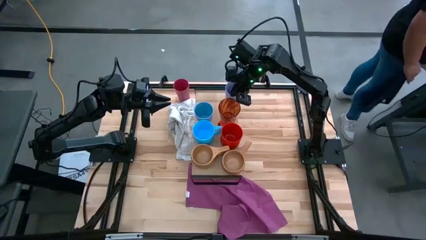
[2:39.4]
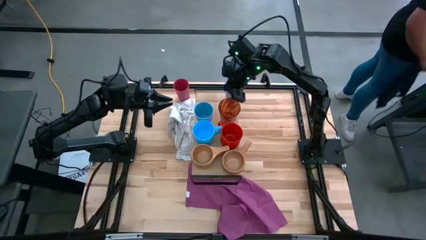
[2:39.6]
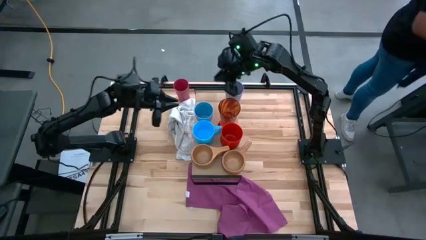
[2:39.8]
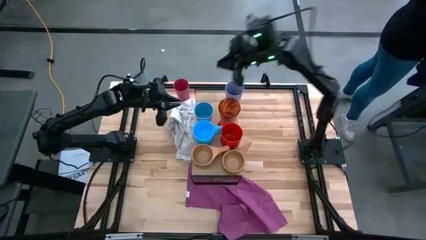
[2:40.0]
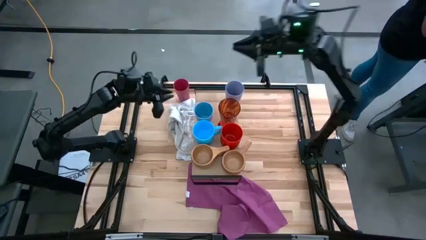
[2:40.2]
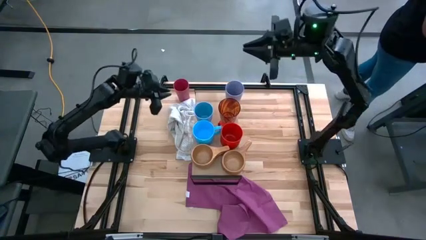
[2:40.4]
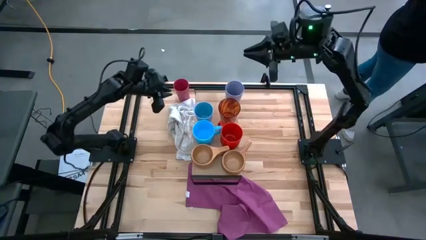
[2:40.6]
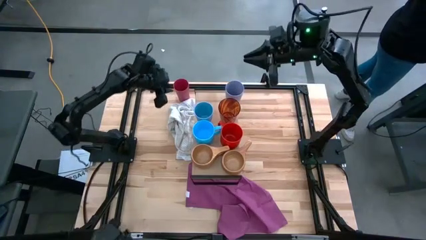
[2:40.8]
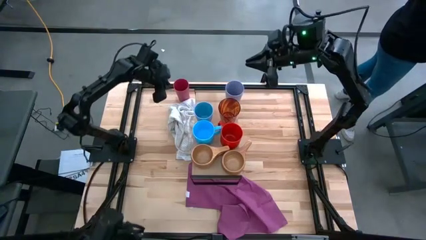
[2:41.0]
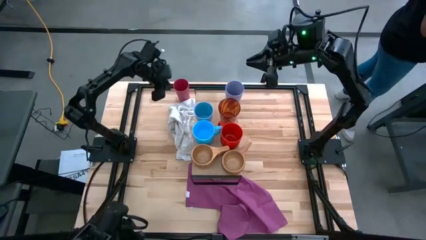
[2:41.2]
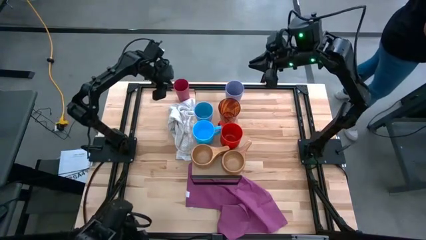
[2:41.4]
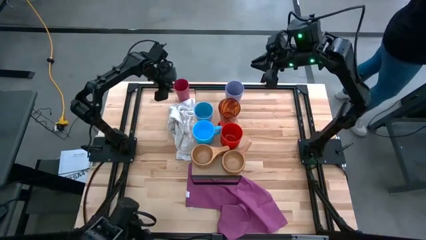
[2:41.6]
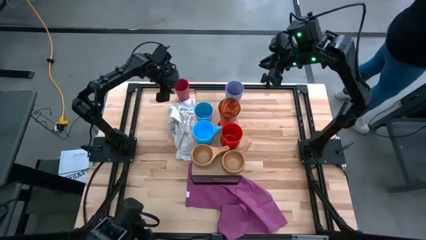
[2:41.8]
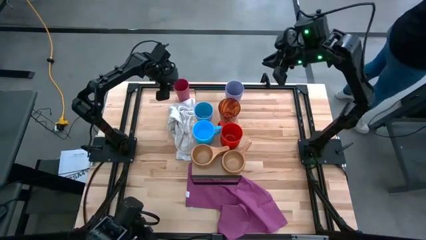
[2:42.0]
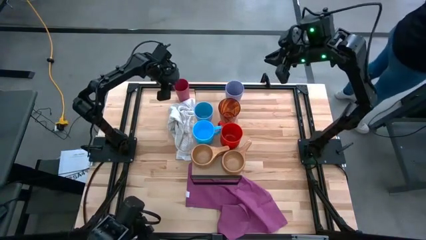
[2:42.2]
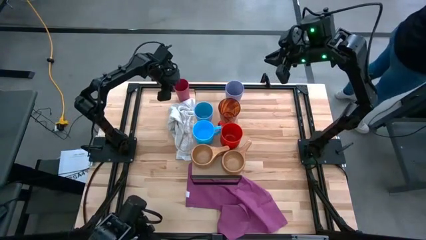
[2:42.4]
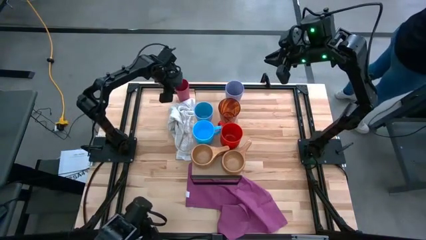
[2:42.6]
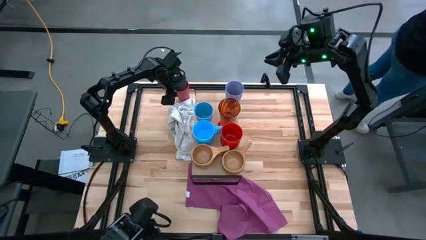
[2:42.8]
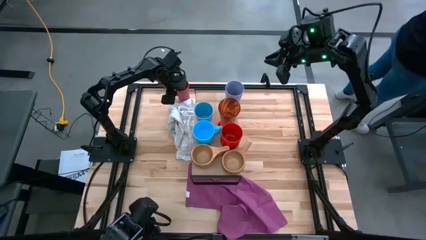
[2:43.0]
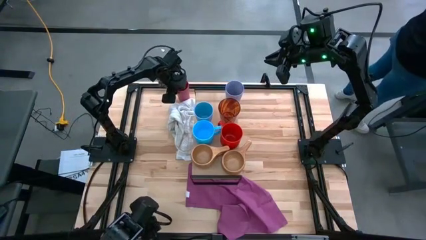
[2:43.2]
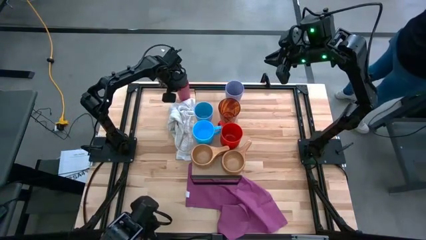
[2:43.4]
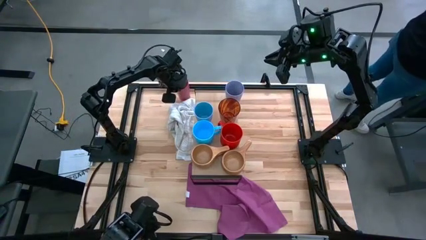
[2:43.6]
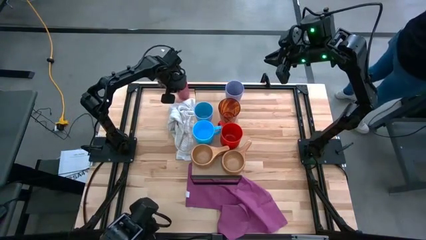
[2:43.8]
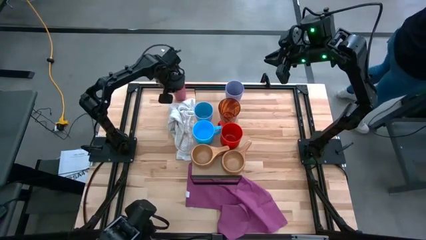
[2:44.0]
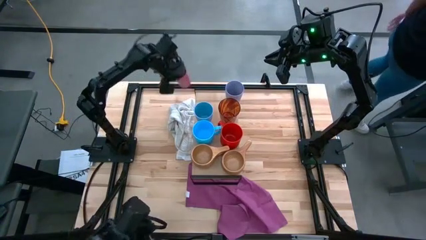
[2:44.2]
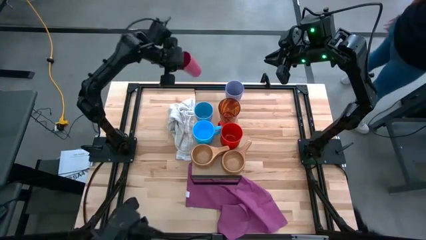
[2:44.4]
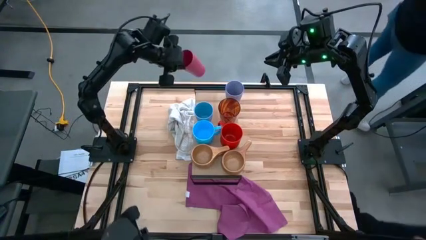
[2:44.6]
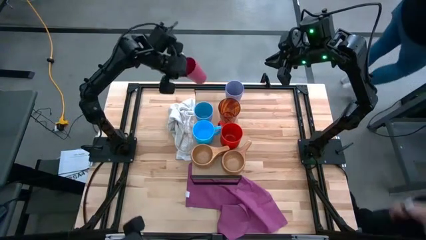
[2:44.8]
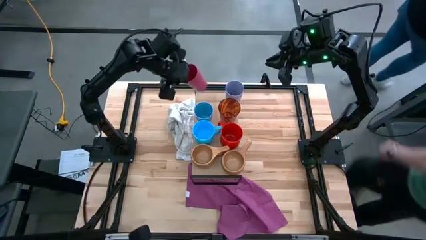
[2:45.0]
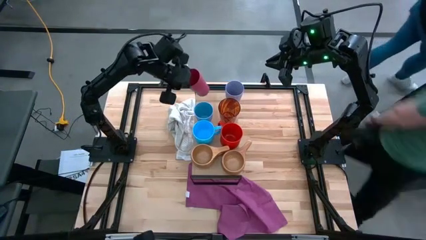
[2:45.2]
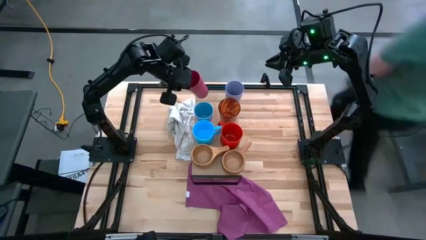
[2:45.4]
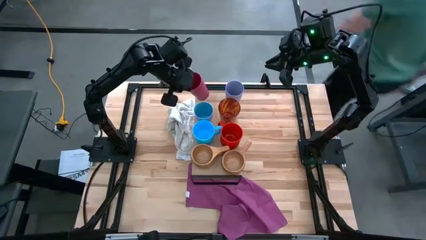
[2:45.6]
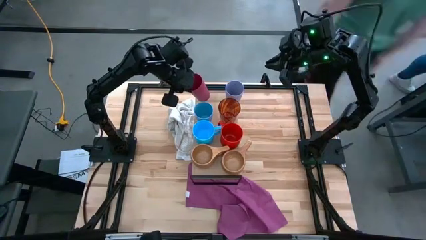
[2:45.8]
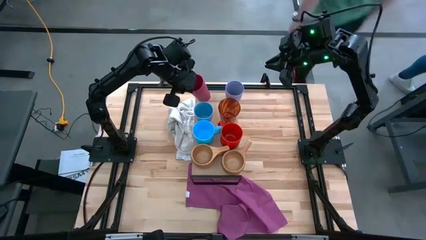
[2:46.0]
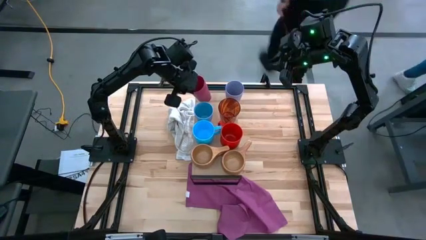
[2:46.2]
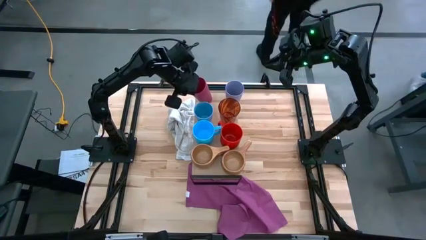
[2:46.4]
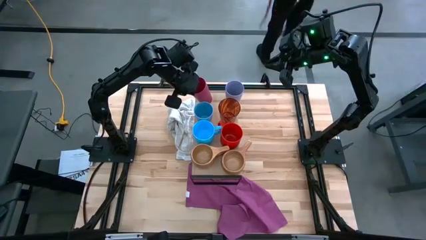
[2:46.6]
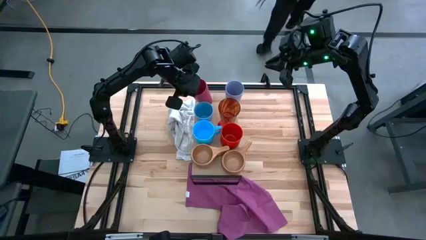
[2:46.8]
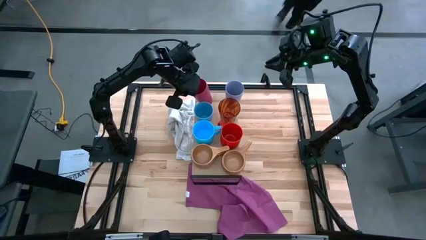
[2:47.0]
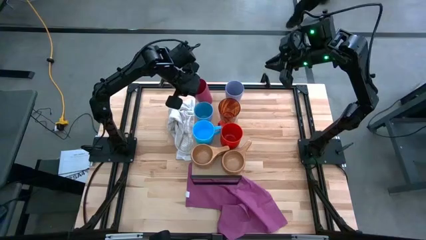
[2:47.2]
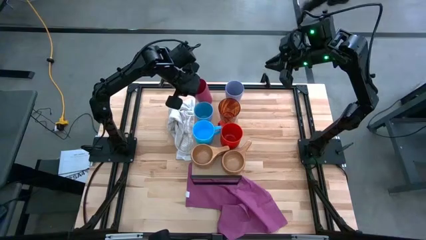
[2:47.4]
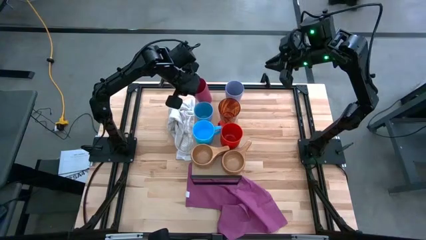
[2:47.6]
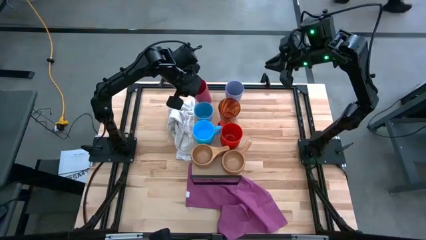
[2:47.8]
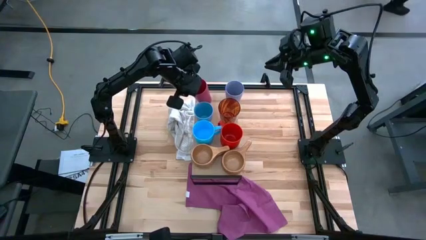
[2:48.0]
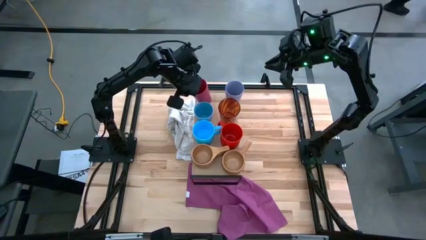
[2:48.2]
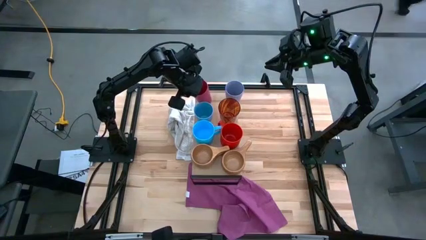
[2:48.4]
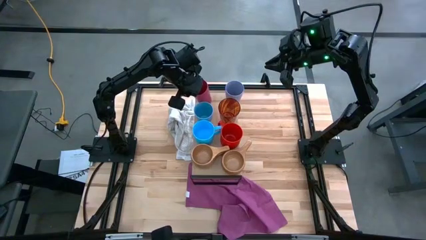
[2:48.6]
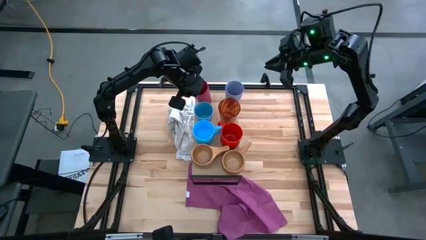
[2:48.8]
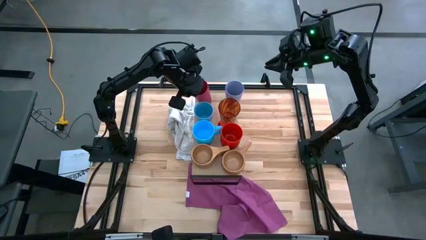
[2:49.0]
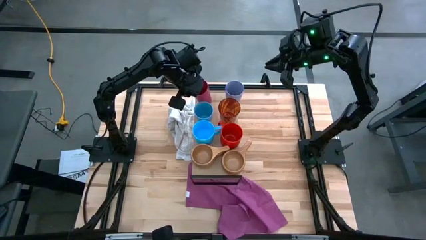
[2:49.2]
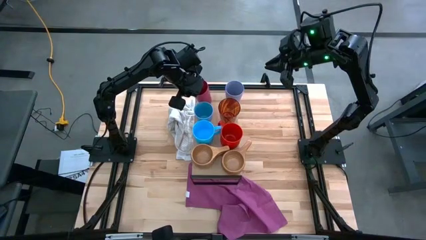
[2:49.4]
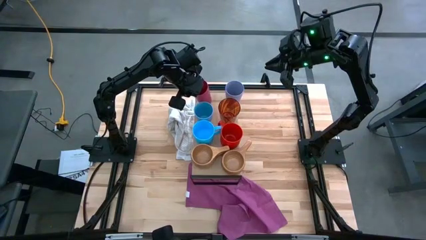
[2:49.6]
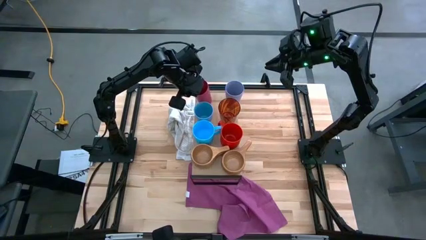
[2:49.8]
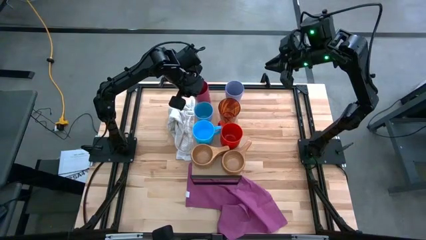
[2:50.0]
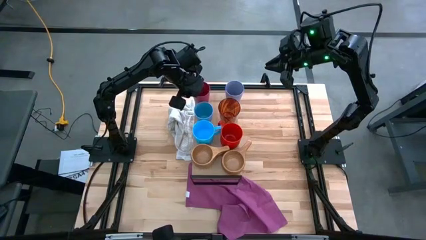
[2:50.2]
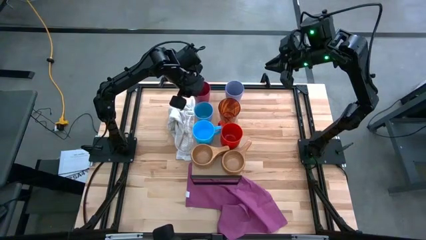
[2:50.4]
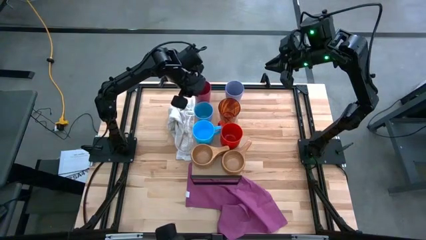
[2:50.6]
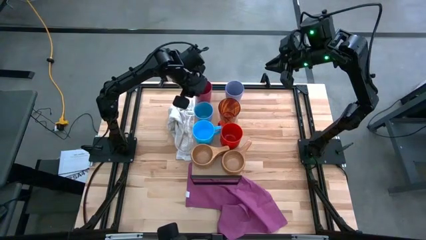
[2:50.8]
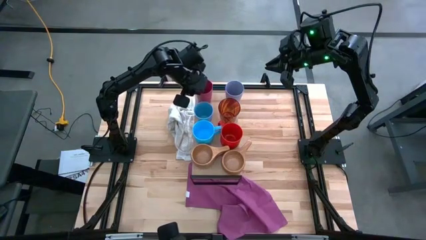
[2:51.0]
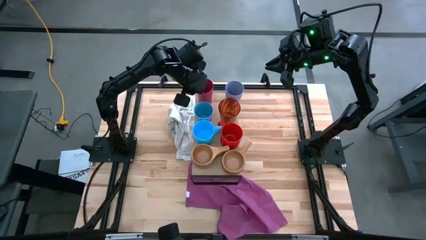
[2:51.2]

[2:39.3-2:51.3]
Task: Stack small to large cups/mugs on shelf
Put the pink cup on the shelf

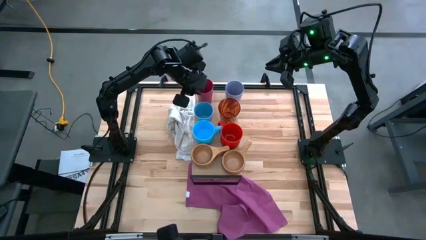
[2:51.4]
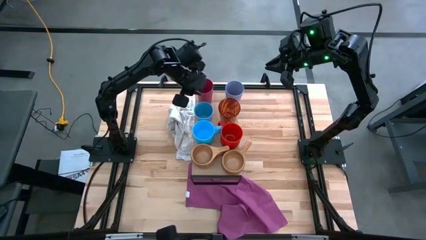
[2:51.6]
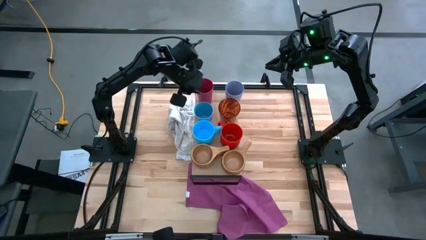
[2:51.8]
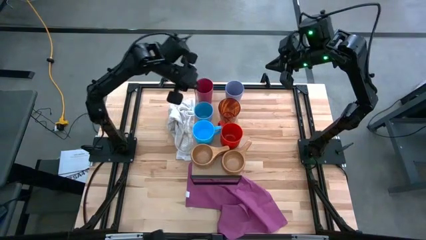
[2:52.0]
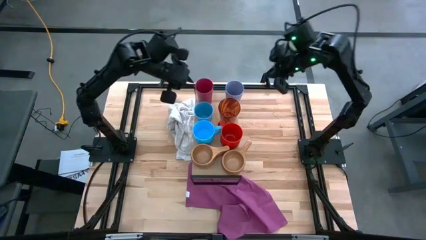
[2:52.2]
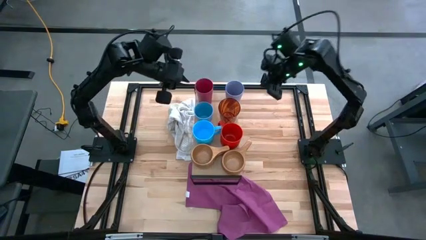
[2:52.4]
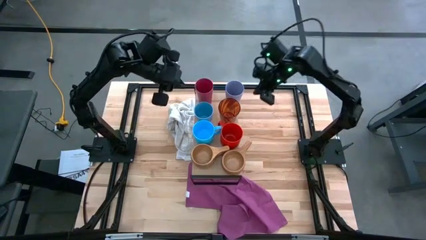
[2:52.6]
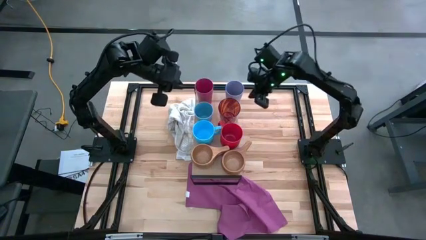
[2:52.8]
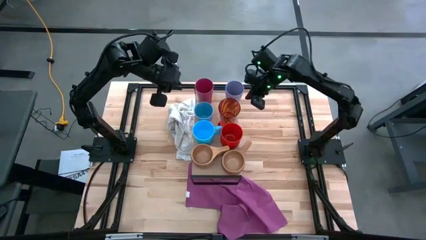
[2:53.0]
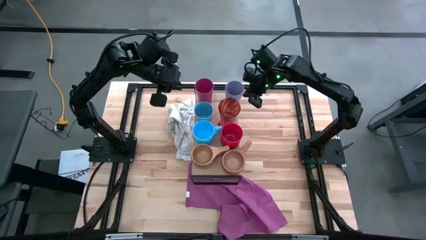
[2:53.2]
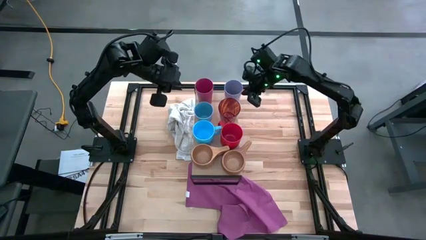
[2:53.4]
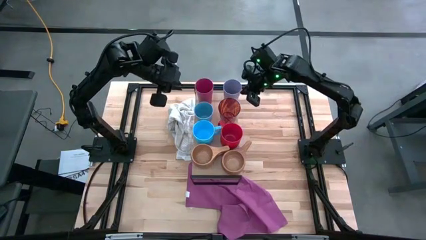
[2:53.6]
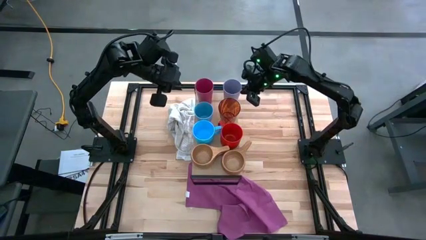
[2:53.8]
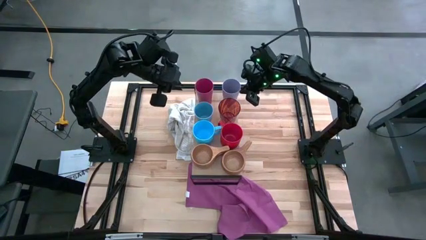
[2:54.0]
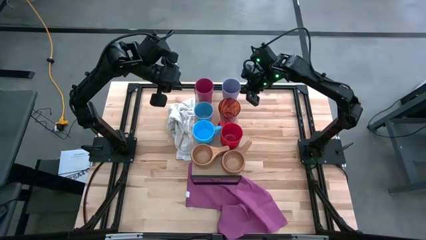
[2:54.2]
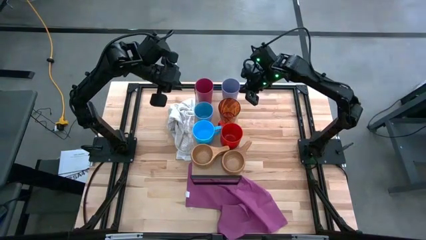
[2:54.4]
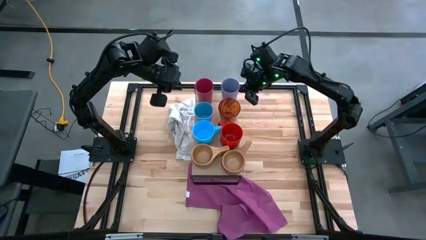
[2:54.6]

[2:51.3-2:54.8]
Adjust the purple cup on the shelf
